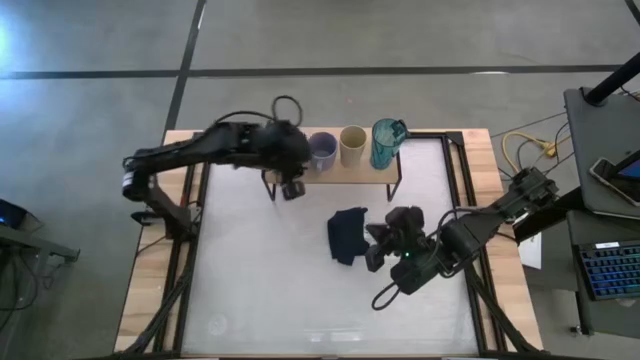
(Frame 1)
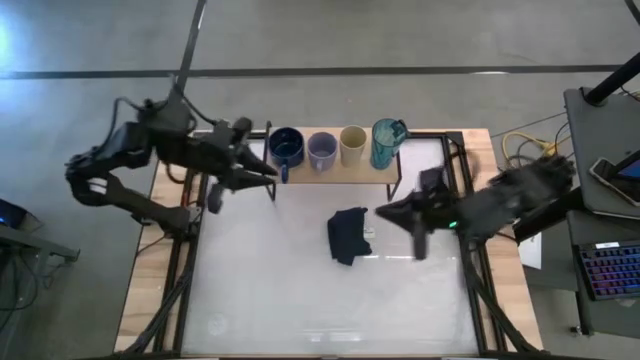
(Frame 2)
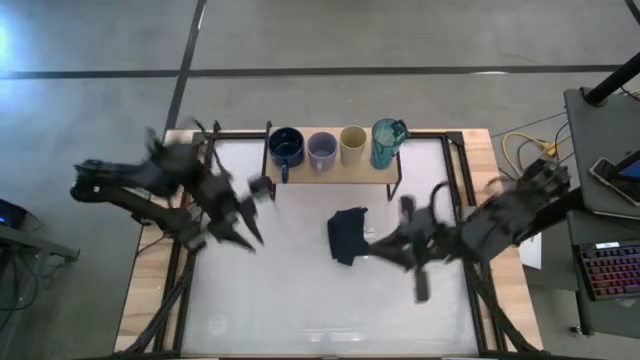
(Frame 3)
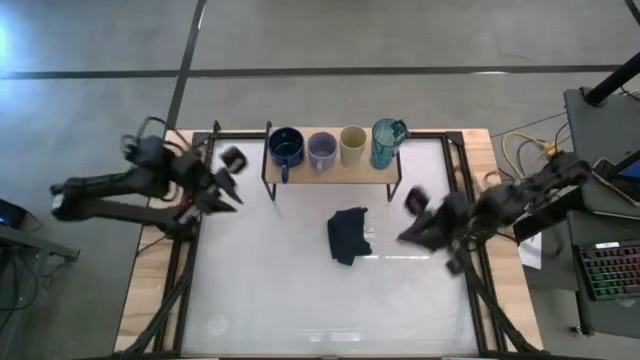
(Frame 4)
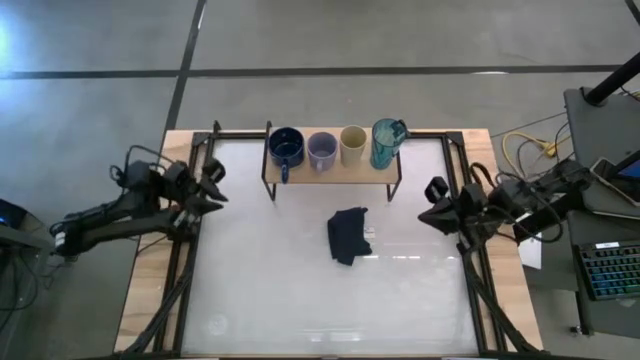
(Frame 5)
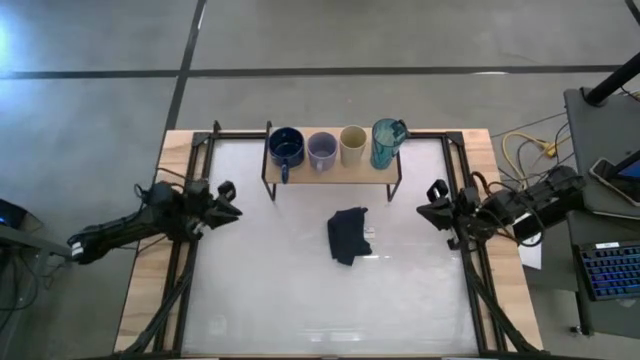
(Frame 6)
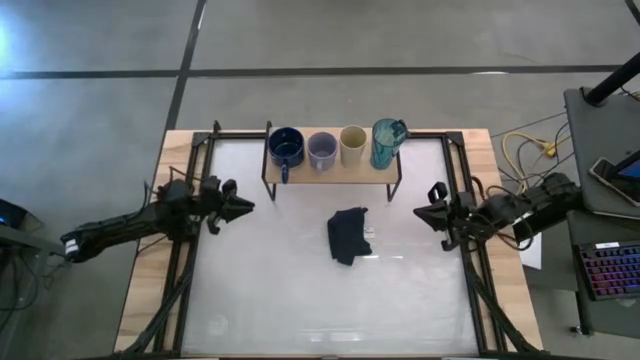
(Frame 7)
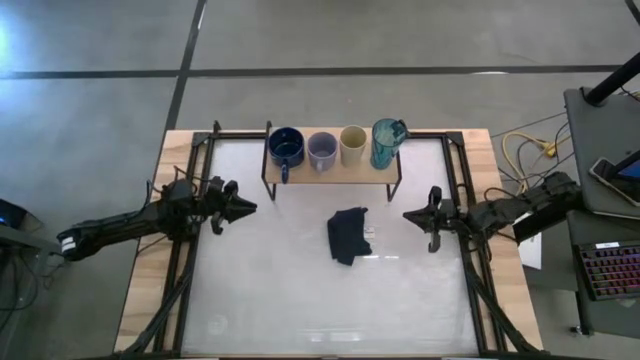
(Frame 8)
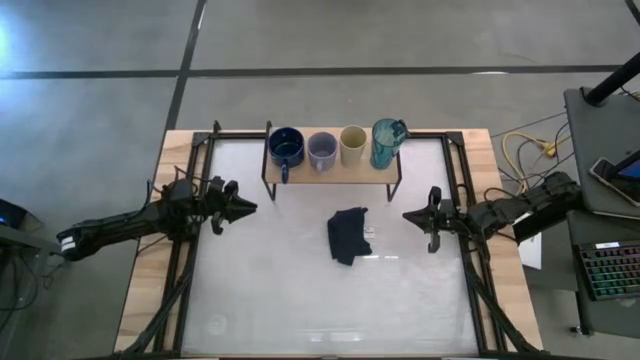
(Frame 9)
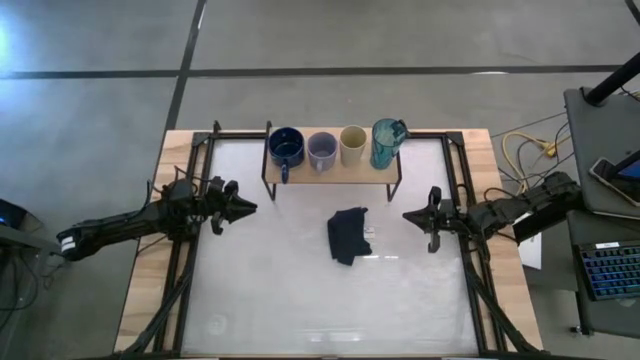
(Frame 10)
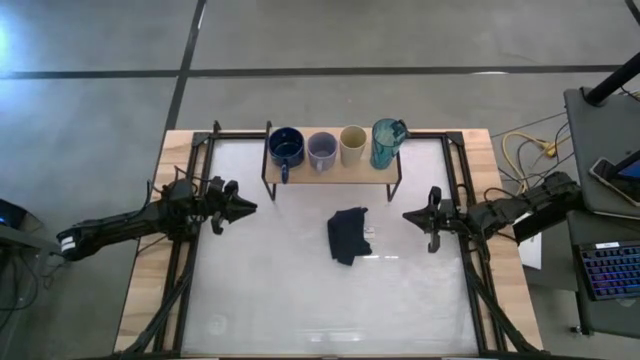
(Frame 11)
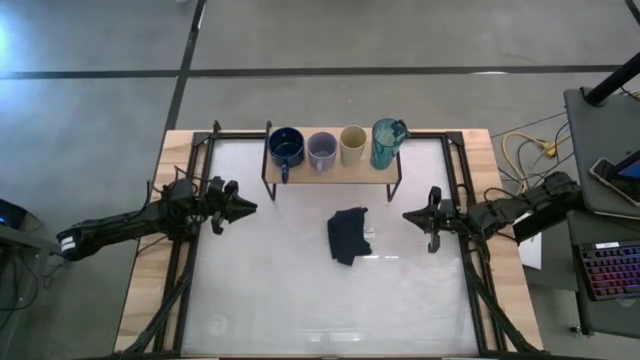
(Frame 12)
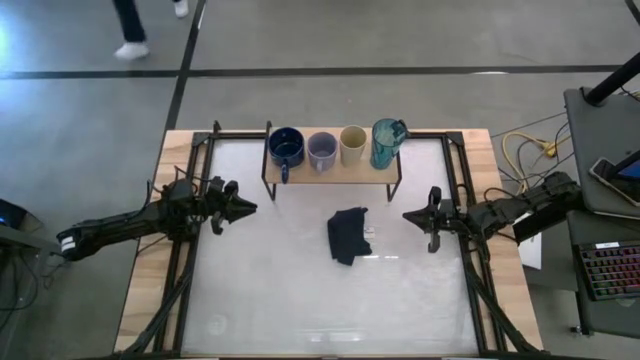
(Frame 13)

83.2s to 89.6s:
Task: Stack small to large cups/mugs on shelf
Return to Home Position

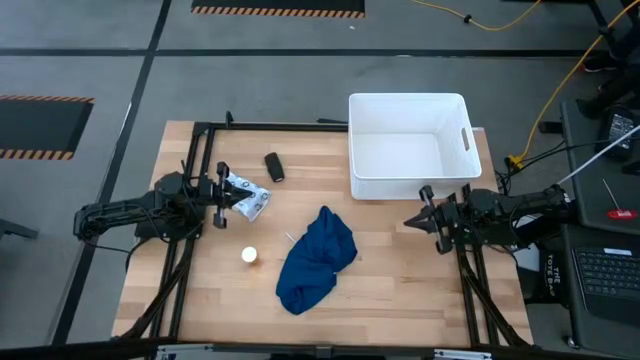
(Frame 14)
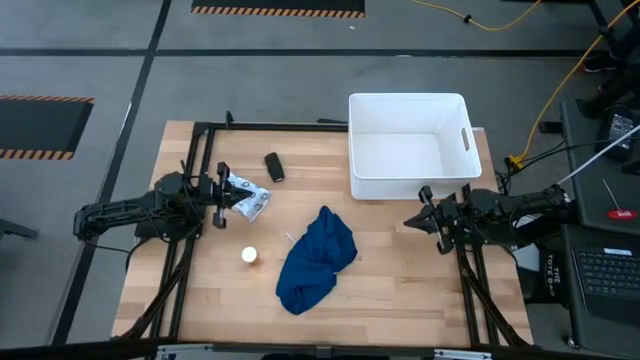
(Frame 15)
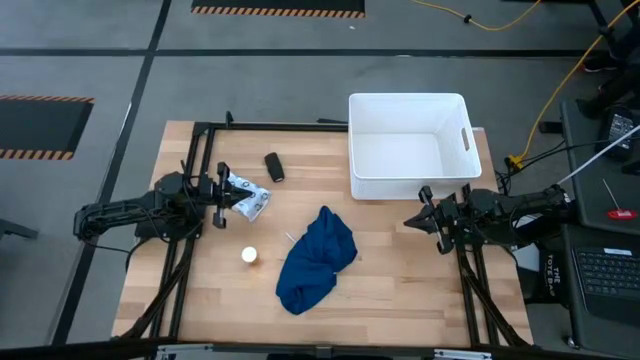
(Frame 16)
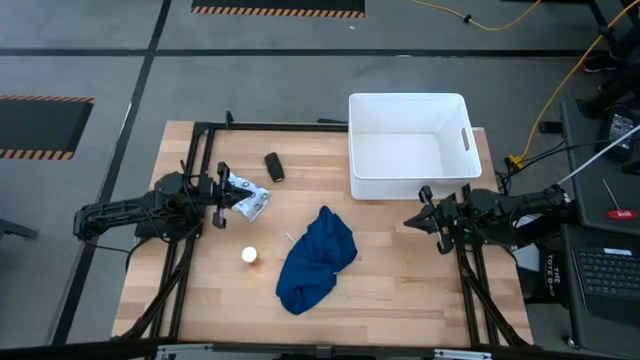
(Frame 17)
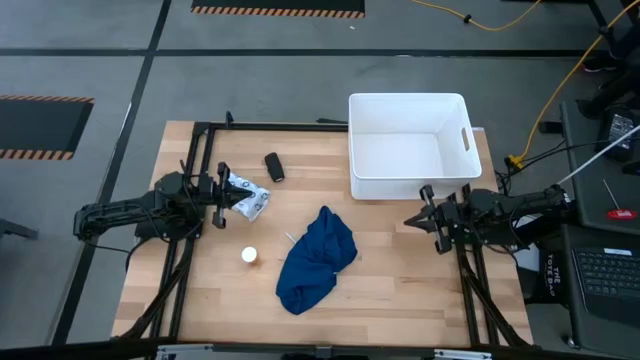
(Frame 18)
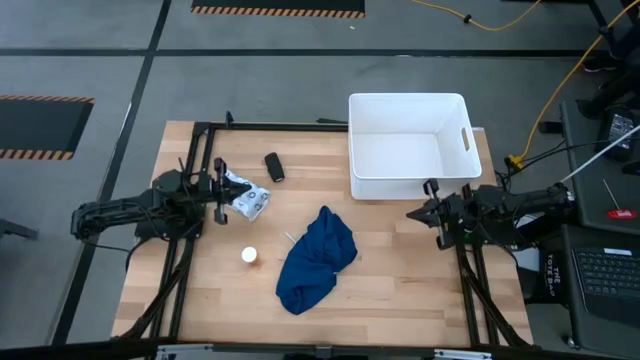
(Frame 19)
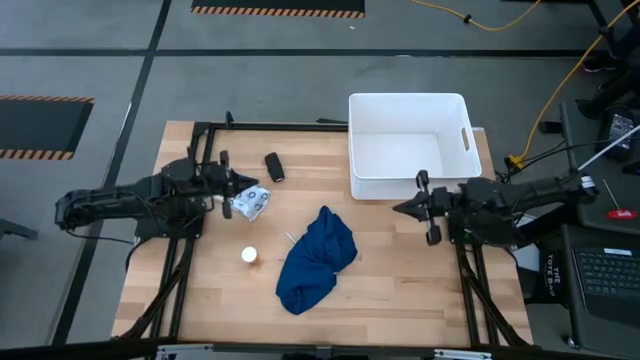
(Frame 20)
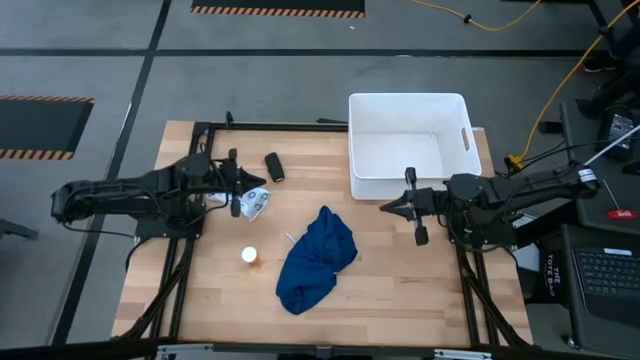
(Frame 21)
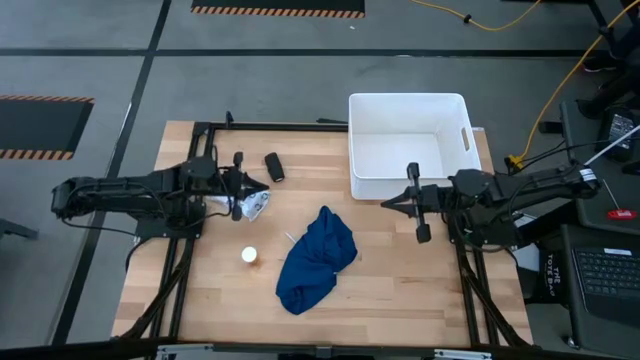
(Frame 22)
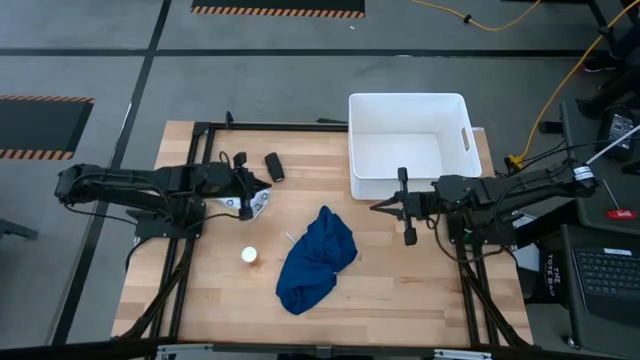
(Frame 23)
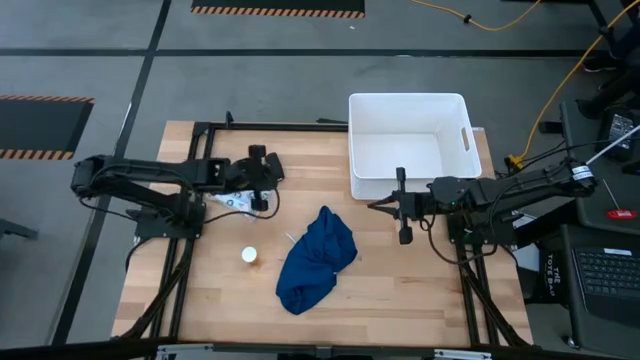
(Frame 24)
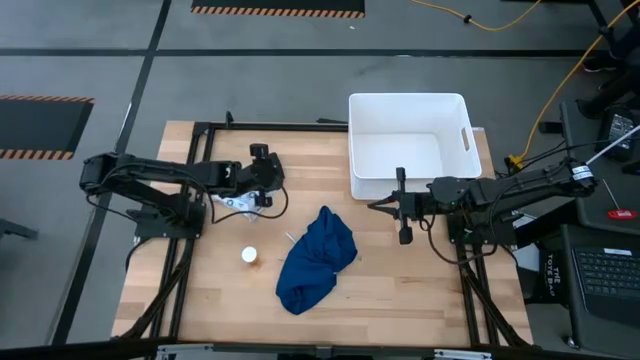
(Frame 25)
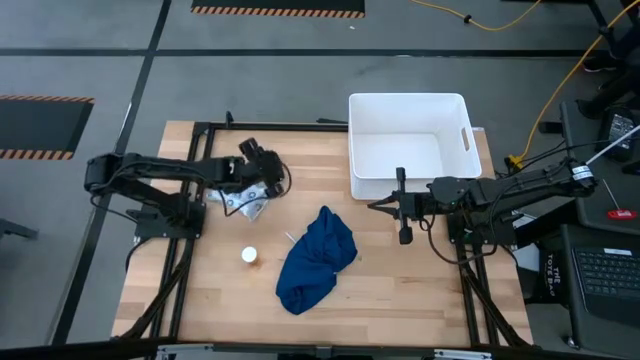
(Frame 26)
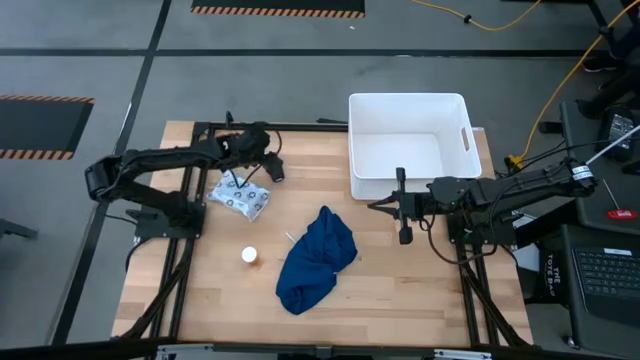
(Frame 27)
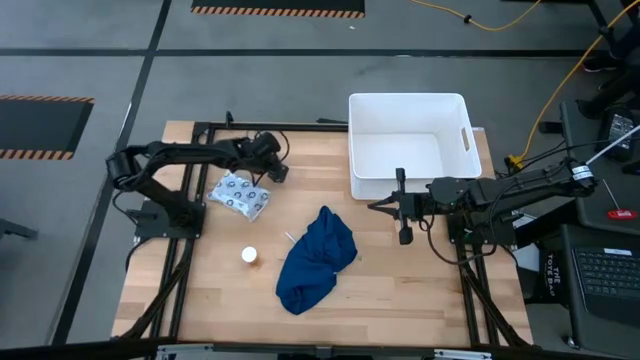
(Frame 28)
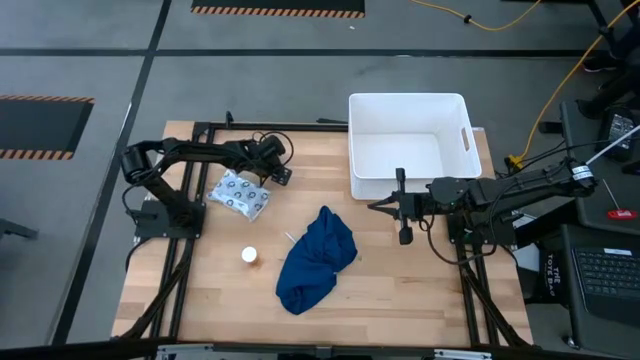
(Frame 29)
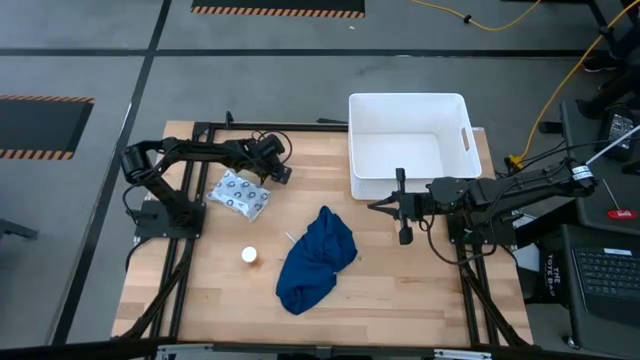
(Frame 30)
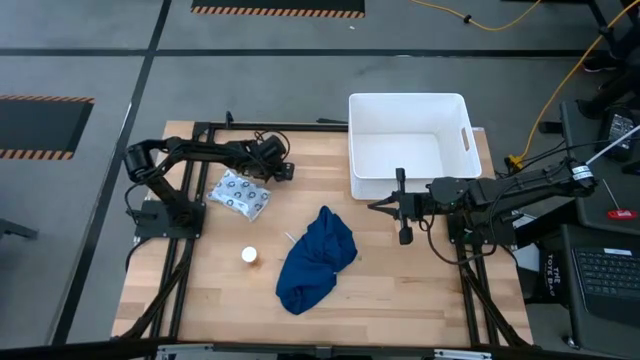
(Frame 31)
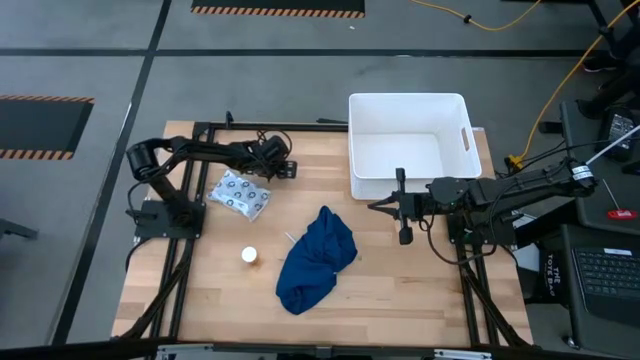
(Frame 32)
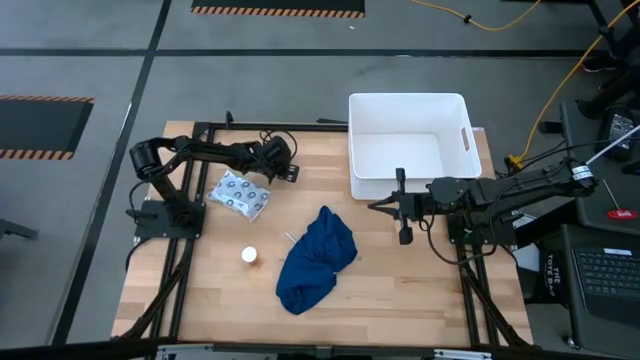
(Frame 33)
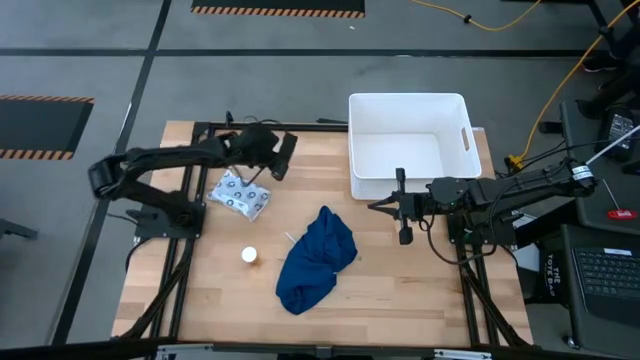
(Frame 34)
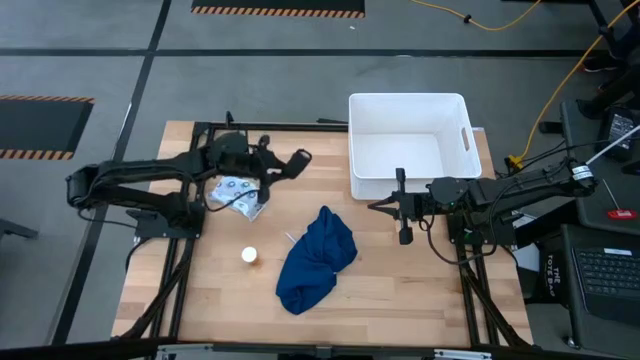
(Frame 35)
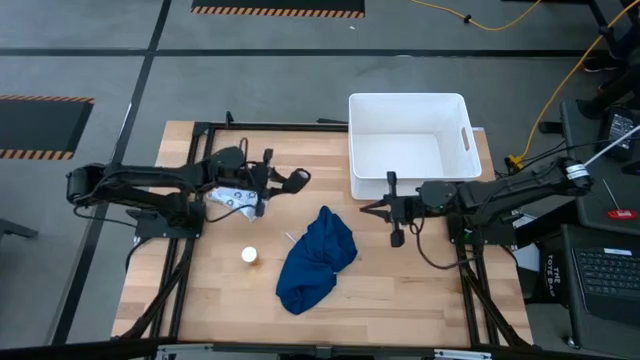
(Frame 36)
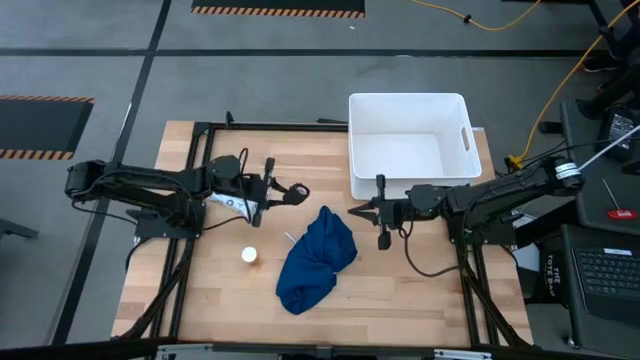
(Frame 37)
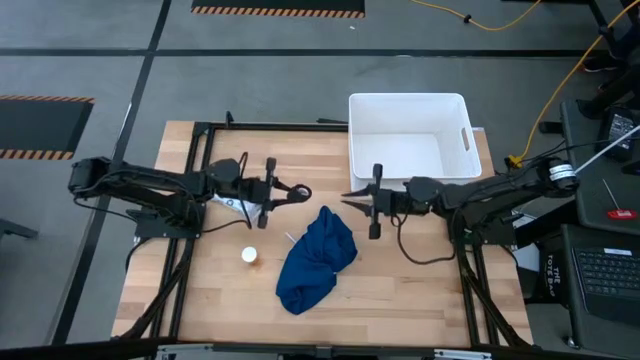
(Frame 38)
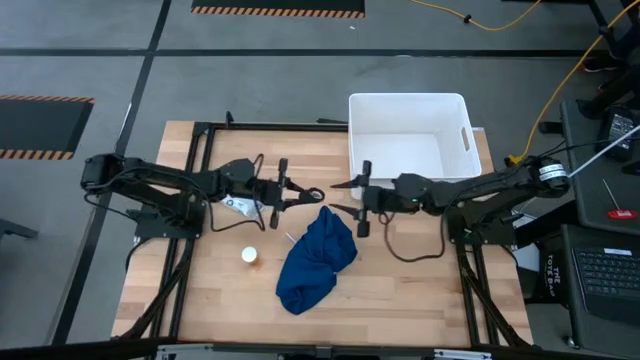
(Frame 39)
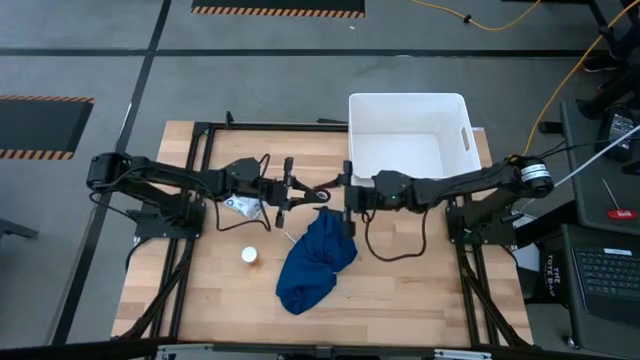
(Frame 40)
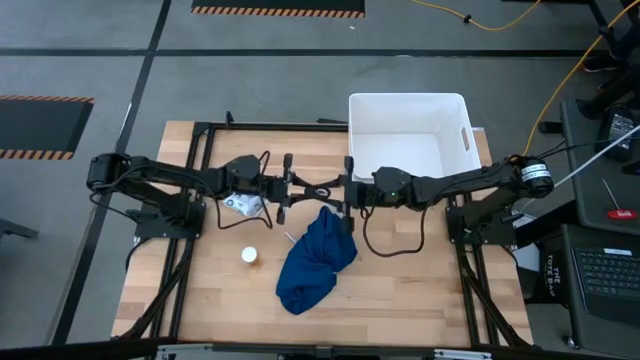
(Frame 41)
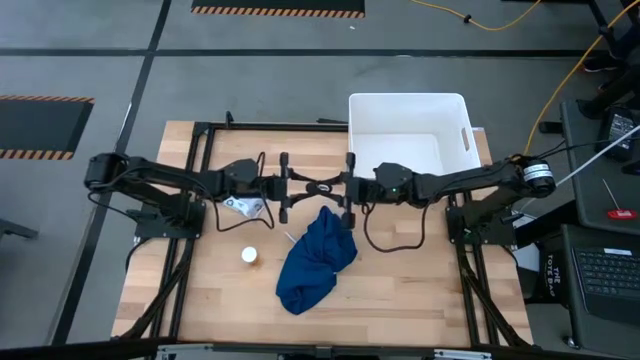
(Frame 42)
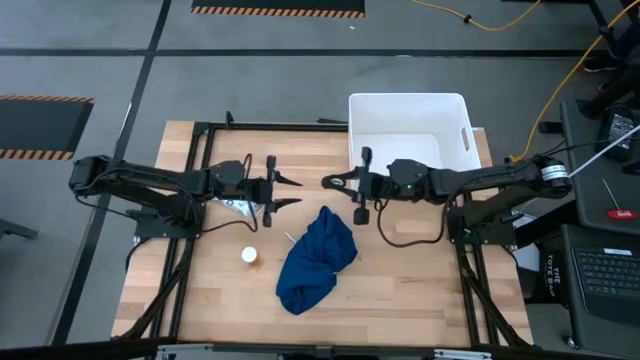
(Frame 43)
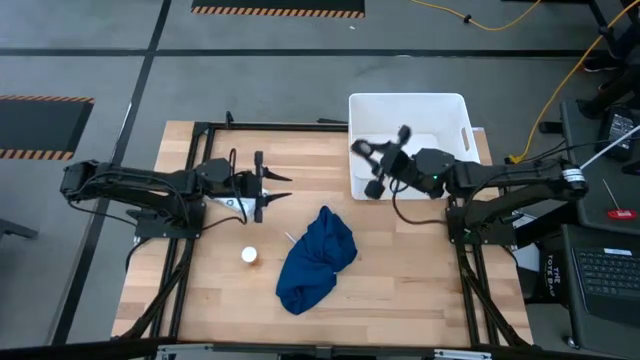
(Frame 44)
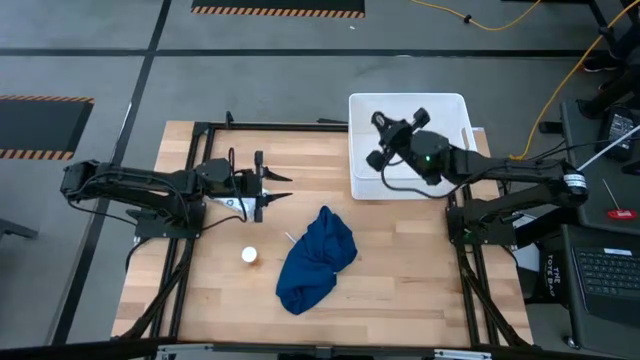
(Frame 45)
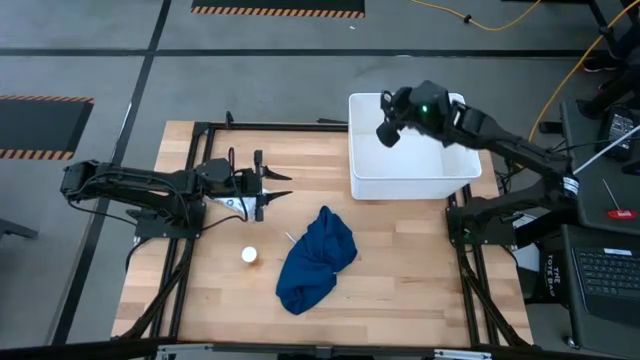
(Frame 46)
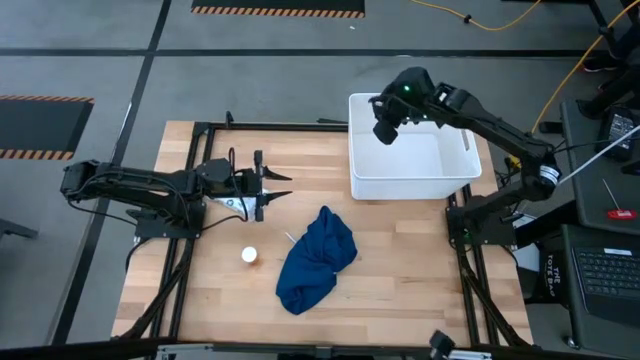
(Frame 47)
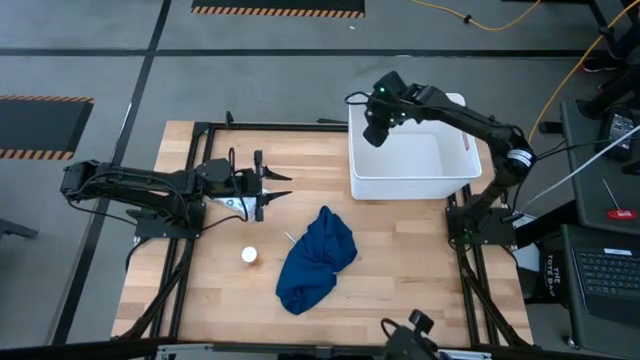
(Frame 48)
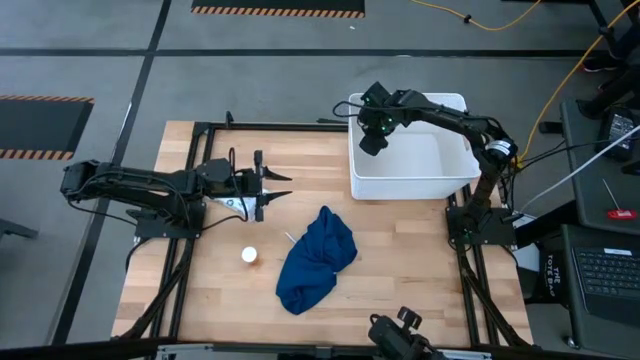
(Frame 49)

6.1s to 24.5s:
Task: Pick & place medical supplies in basket/bin
Put the black bandage into the white container
